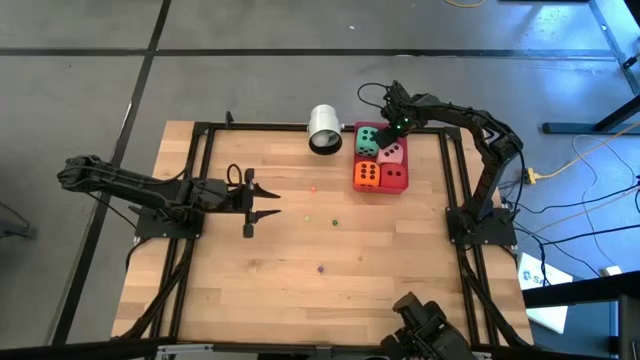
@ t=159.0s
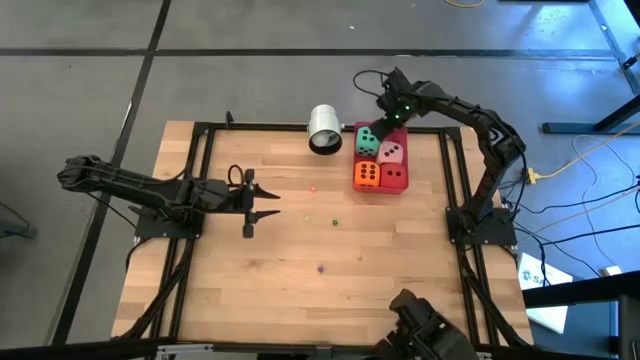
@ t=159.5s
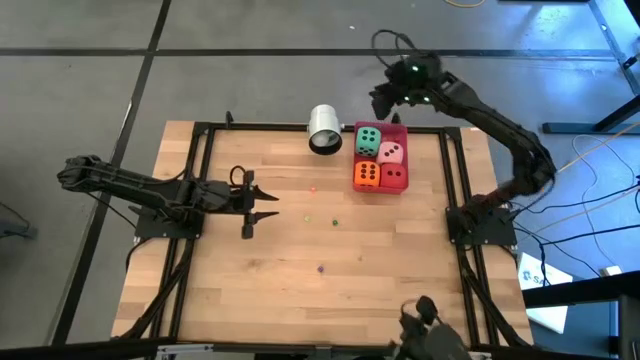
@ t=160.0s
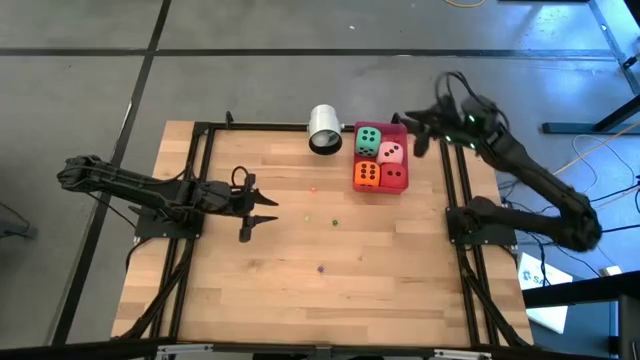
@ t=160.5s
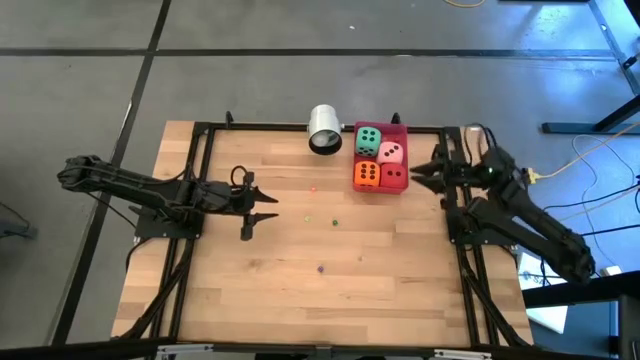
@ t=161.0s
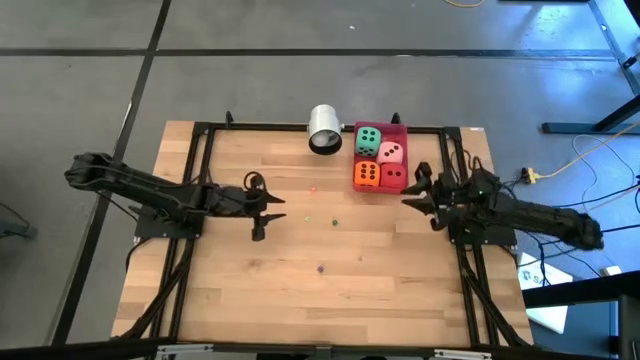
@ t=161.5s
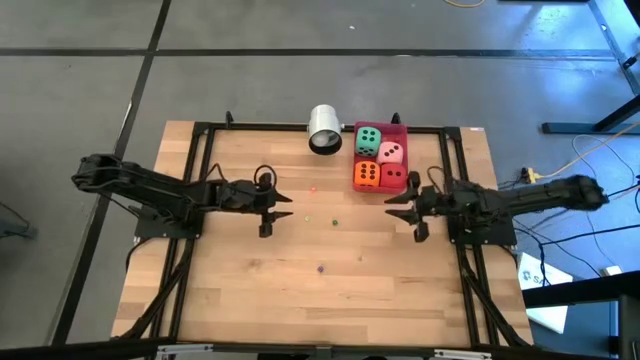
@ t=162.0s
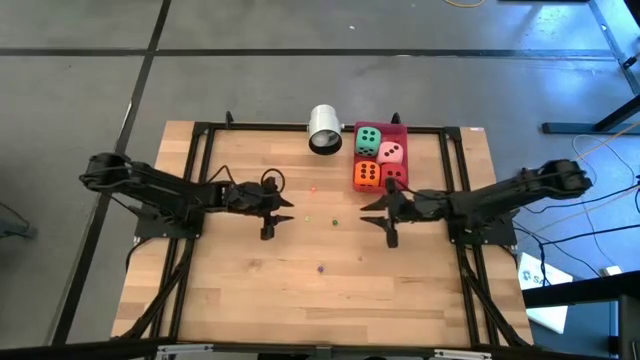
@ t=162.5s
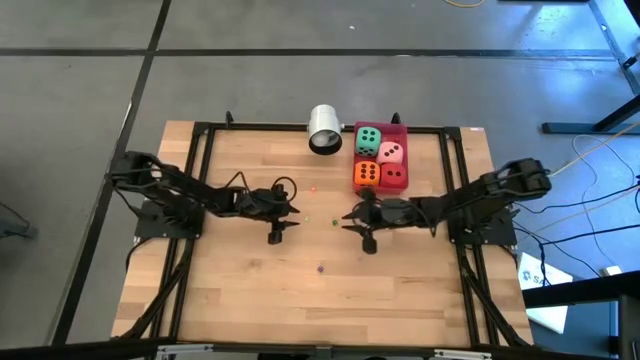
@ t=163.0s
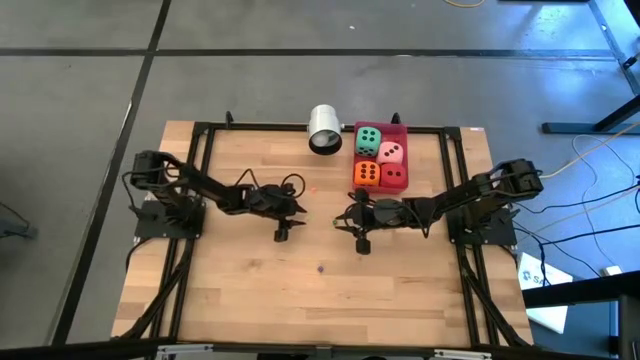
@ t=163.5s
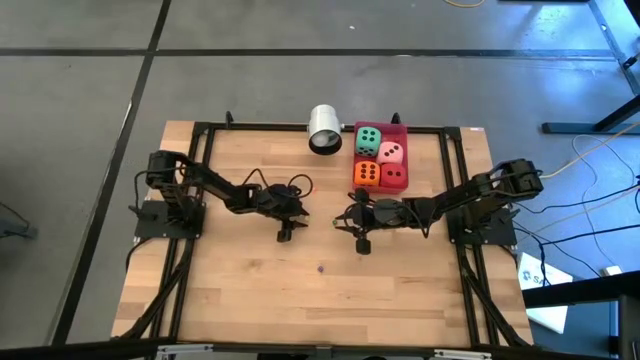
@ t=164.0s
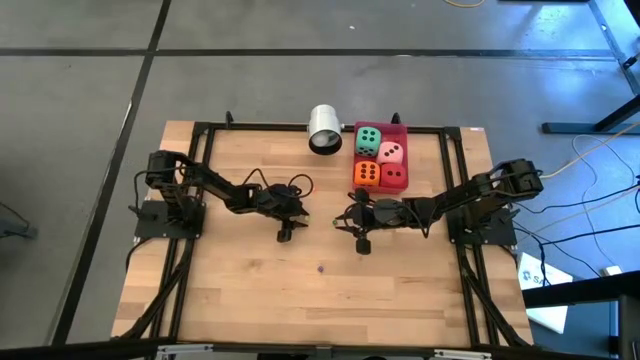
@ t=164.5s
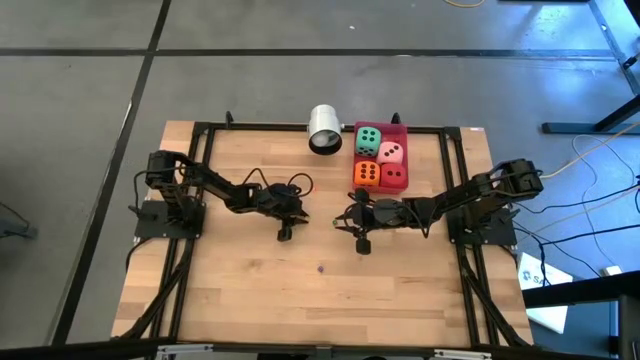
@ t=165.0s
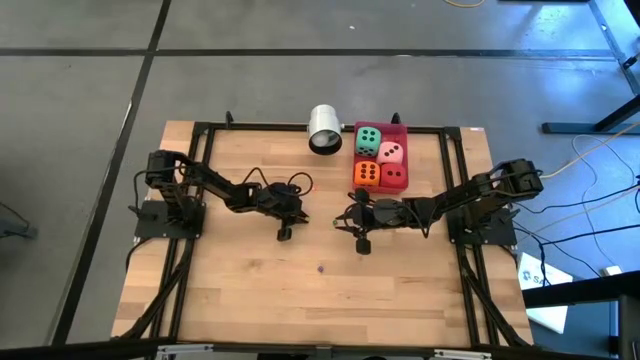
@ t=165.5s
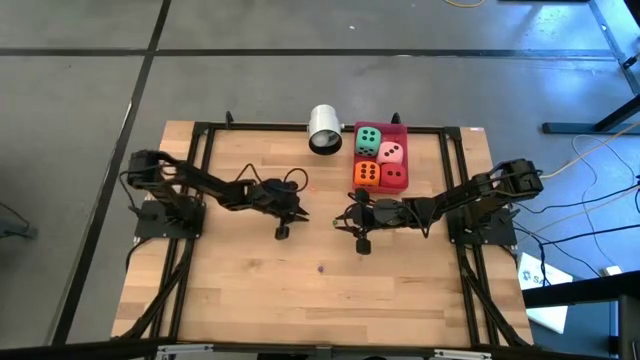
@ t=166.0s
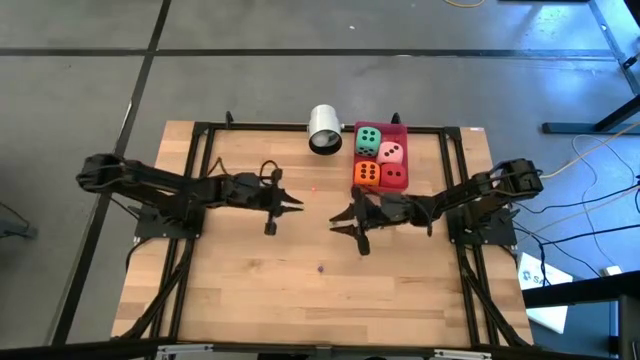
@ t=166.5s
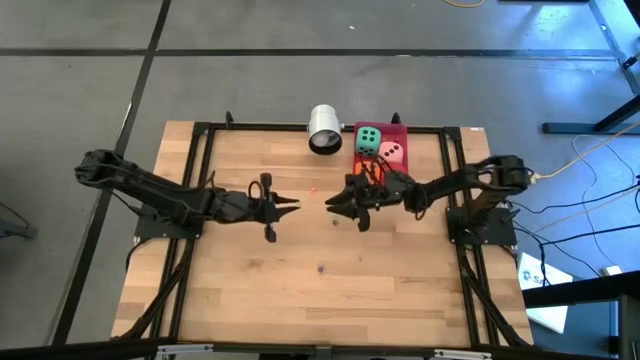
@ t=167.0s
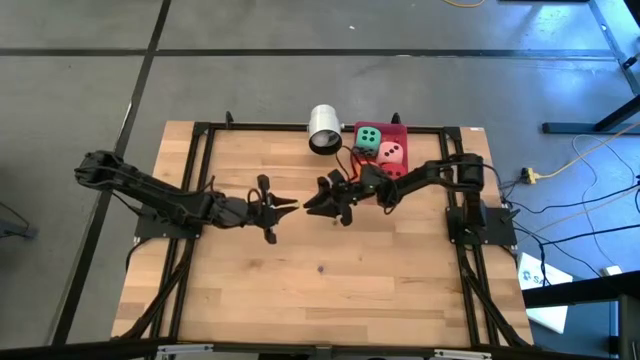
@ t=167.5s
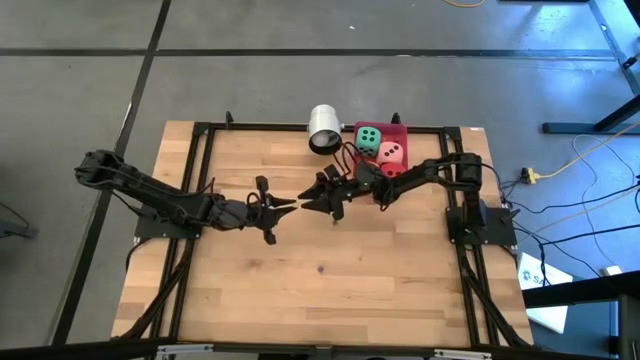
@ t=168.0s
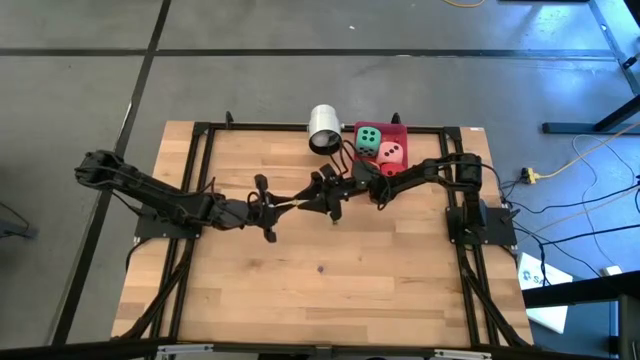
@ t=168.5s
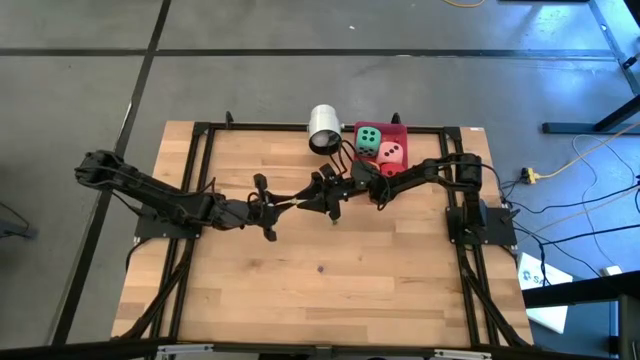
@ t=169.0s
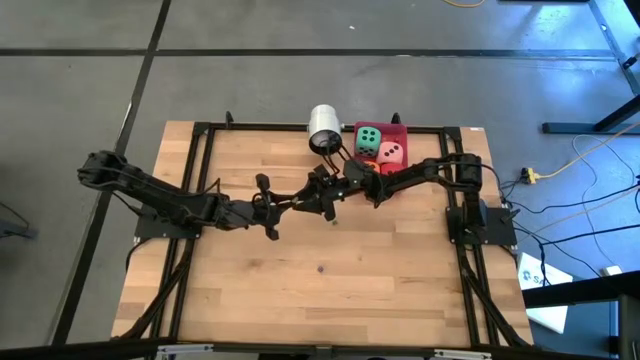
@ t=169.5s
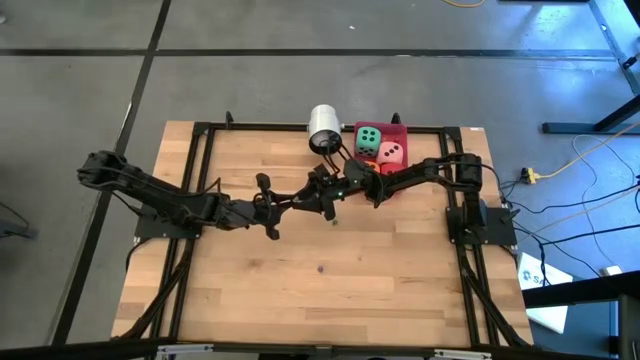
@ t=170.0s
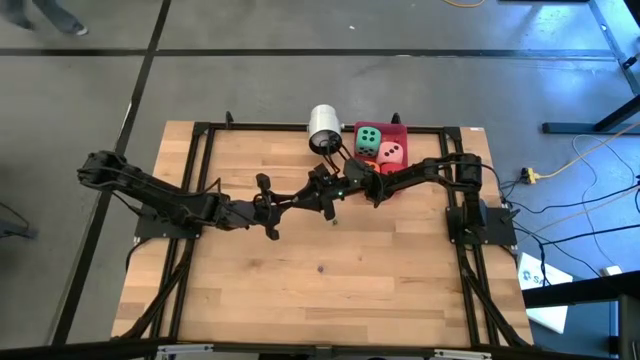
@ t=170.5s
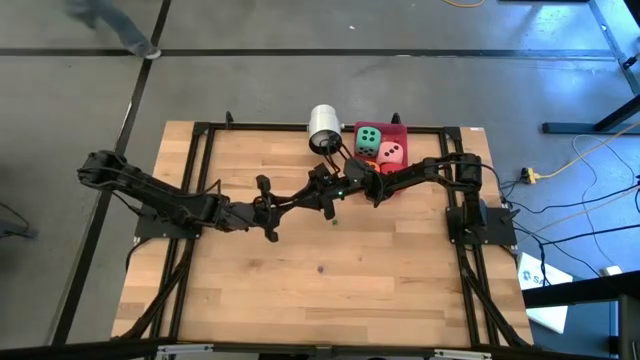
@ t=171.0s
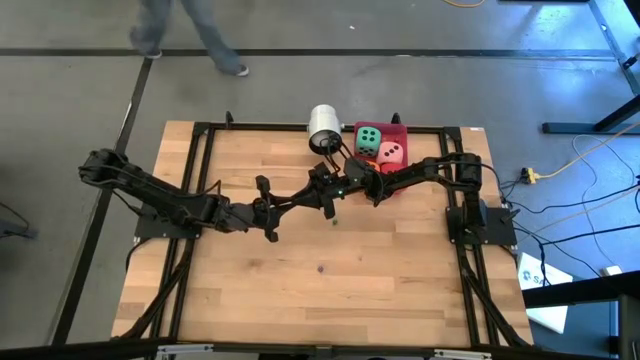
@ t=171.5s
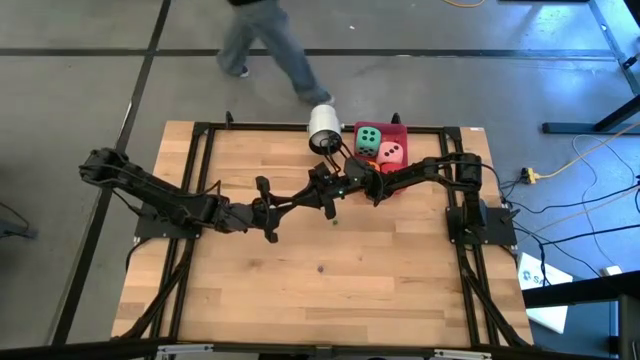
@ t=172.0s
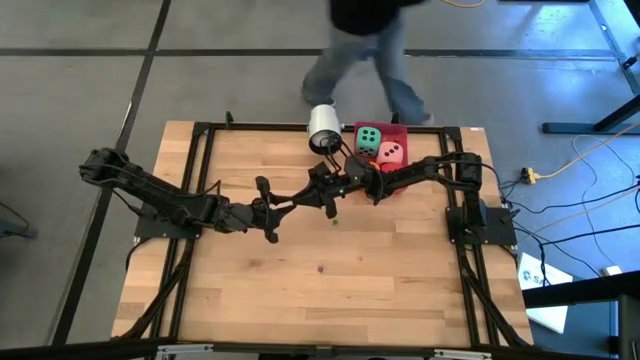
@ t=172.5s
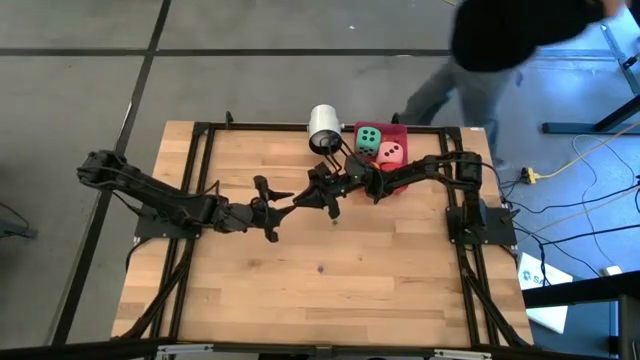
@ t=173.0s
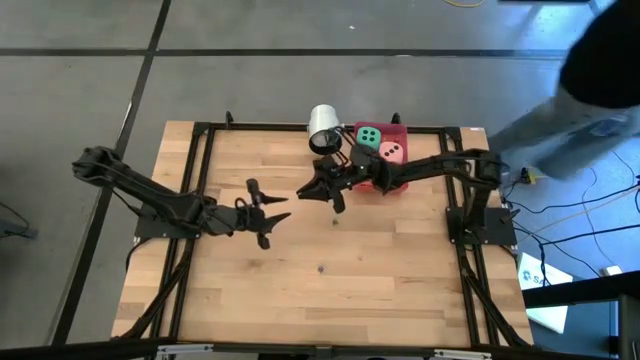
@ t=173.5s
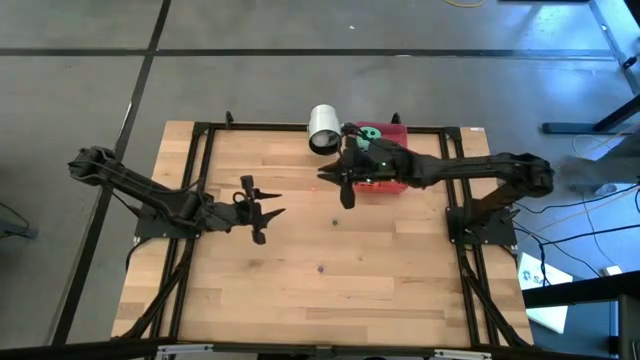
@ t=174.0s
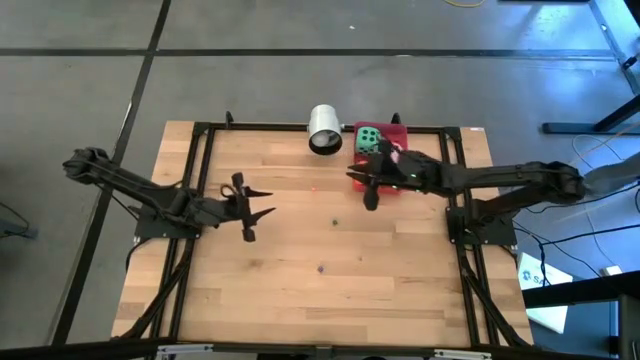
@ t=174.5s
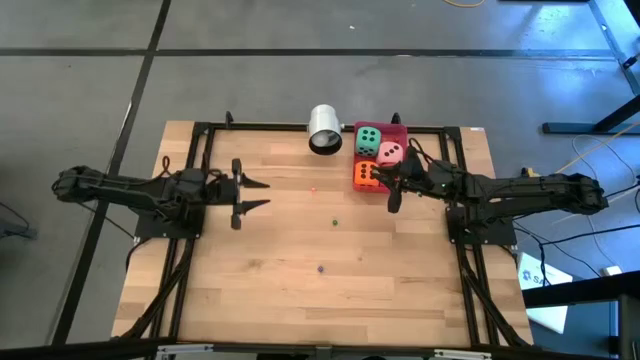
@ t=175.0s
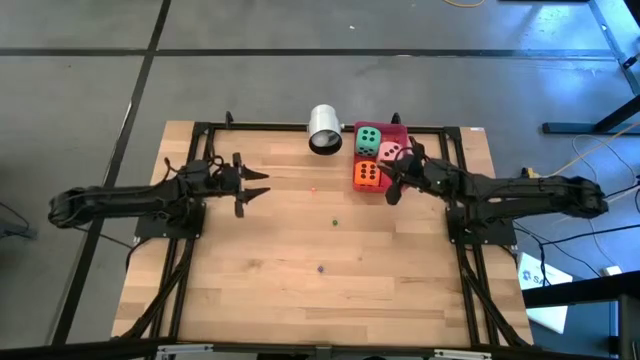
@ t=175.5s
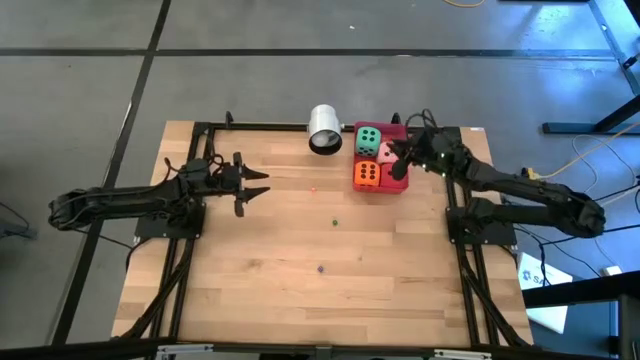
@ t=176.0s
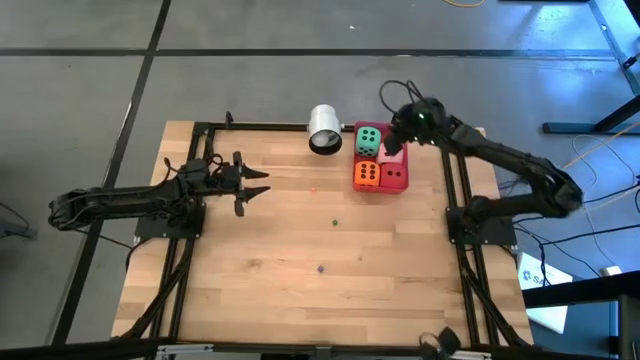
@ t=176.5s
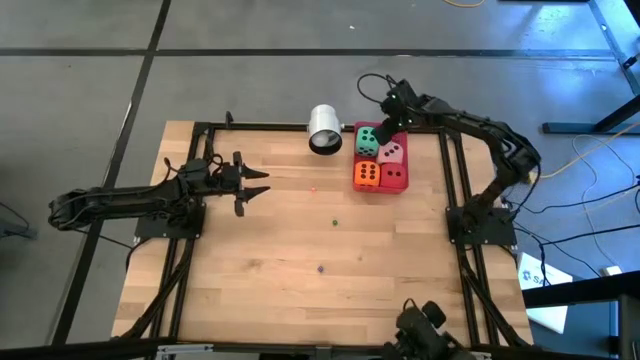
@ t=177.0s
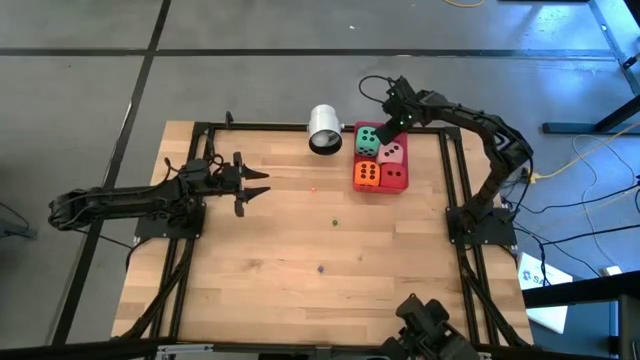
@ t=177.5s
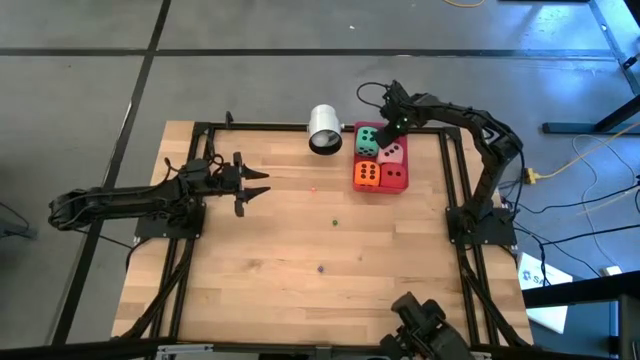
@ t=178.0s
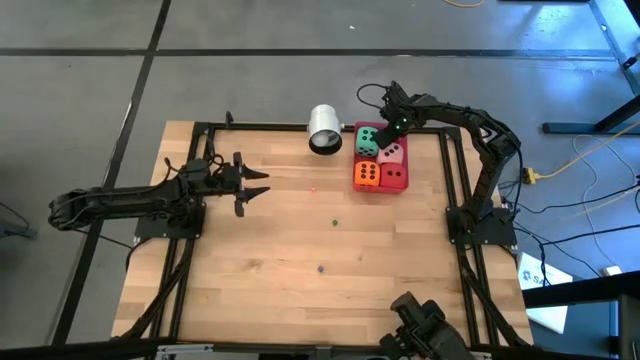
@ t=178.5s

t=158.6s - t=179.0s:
Task: Pick & Place Dice
Put the small light green dice into the red bin

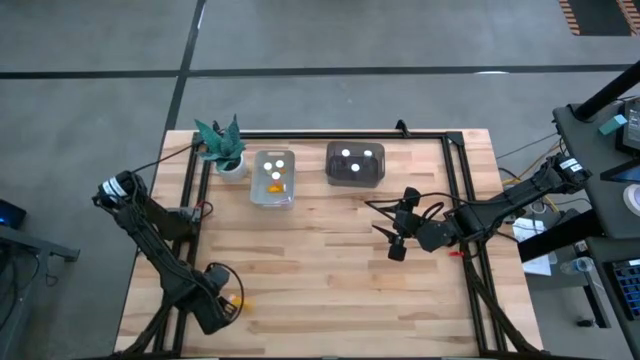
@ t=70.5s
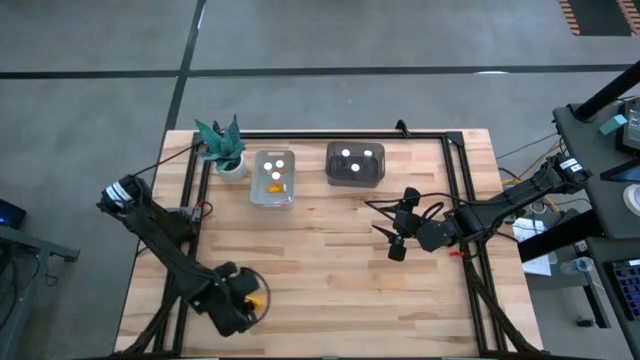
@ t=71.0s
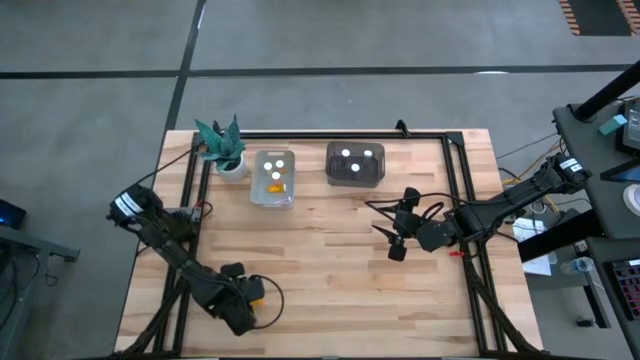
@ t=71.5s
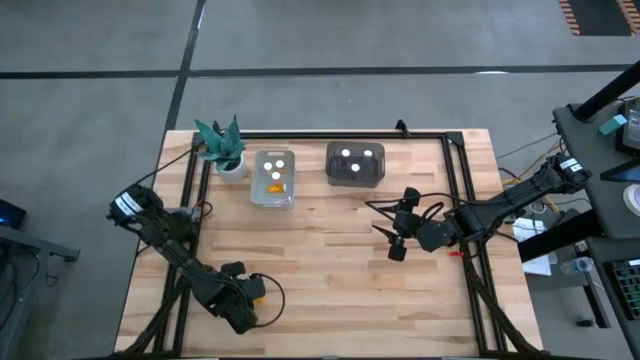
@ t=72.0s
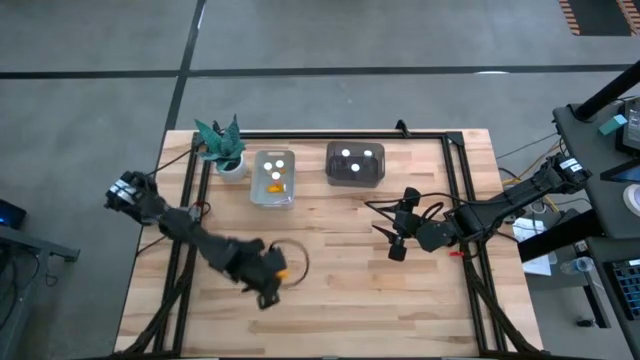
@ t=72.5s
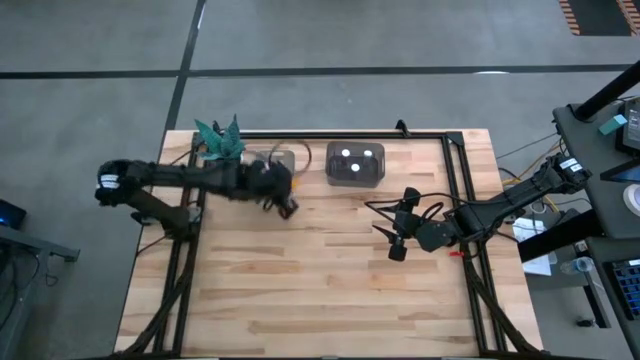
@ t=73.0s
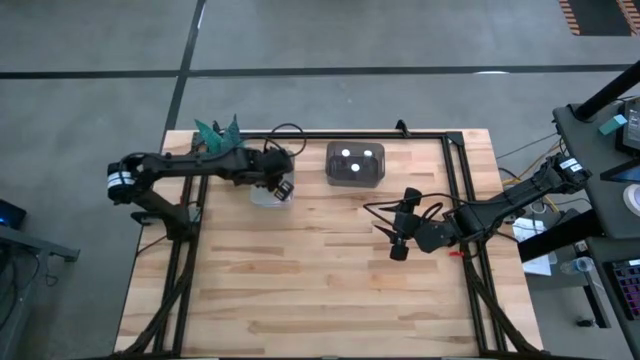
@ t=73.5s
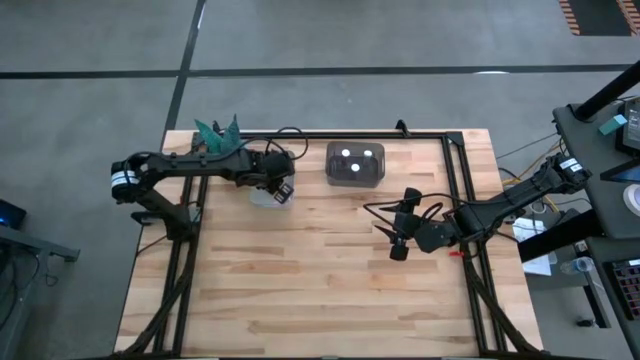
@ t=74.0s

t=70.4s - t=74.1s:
Task: Pick and place medicine bottles into bin by pill shape (circle, oval)
Put the orange tablet bottle into the gray bin
